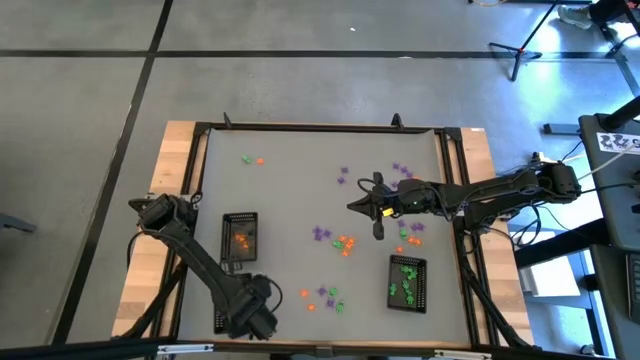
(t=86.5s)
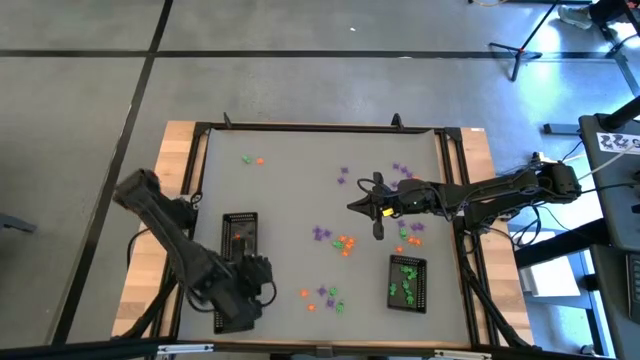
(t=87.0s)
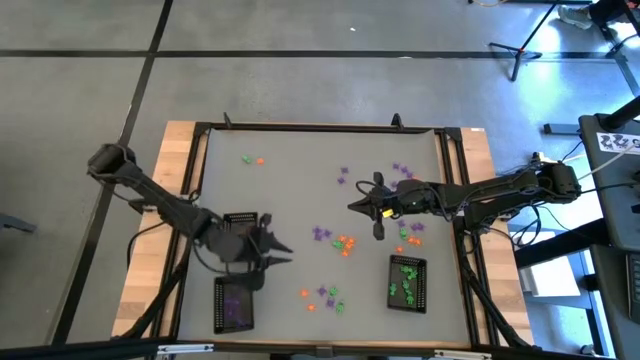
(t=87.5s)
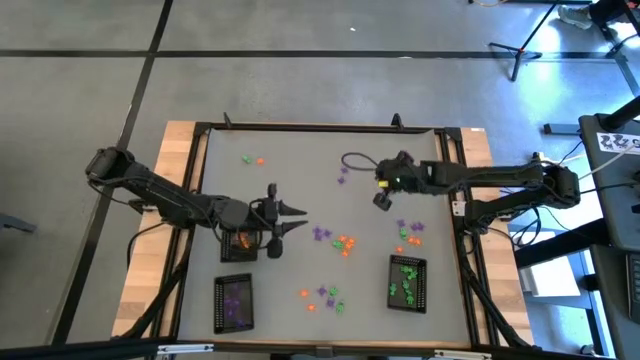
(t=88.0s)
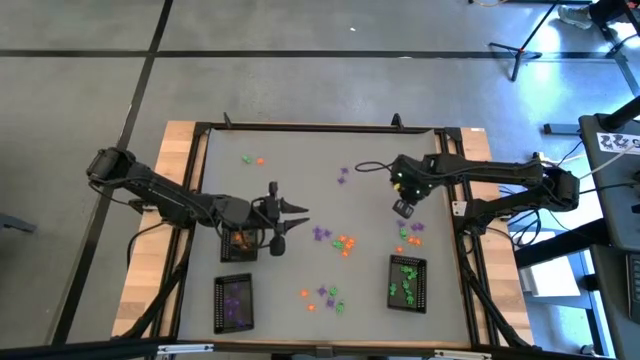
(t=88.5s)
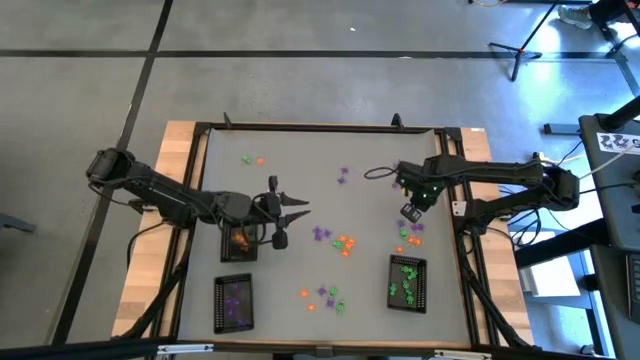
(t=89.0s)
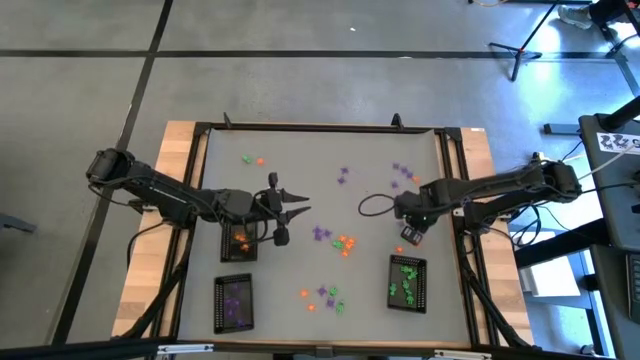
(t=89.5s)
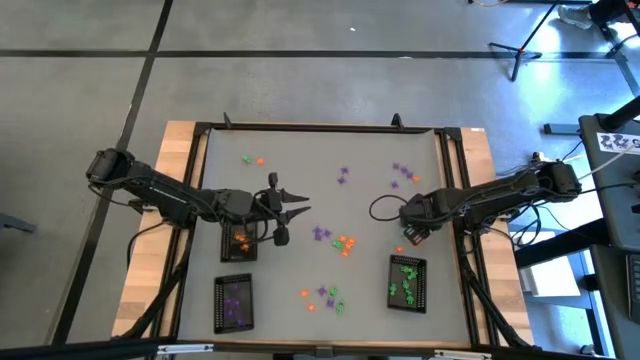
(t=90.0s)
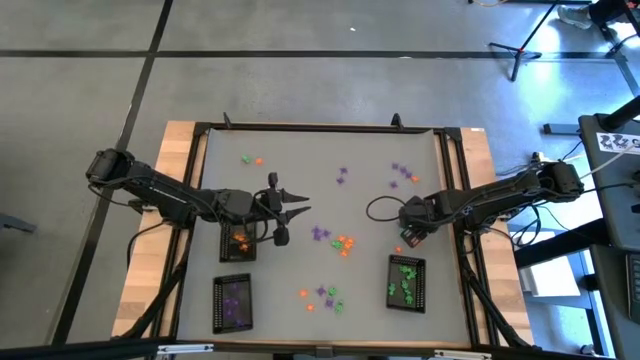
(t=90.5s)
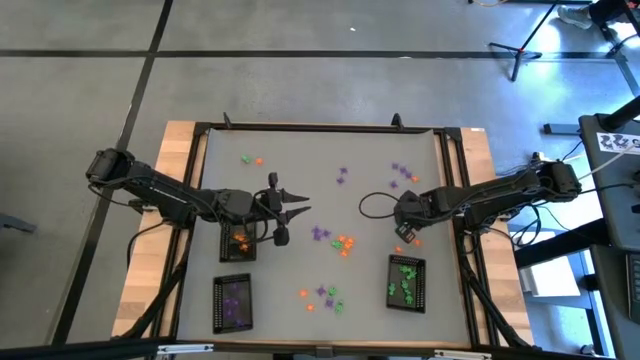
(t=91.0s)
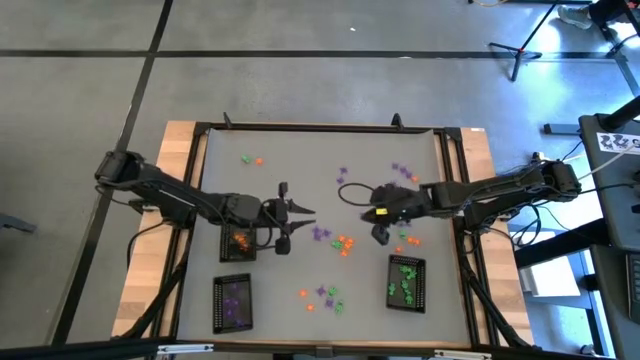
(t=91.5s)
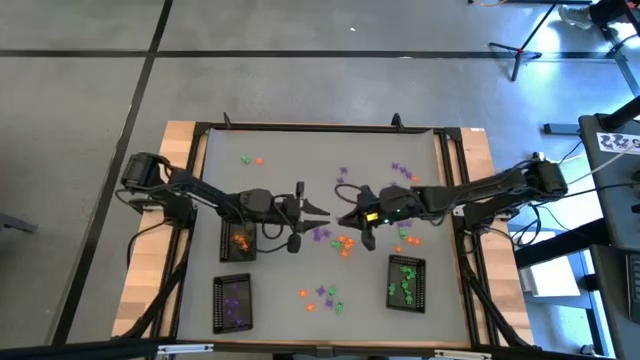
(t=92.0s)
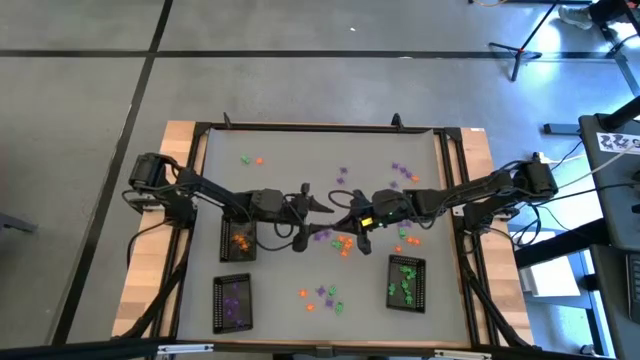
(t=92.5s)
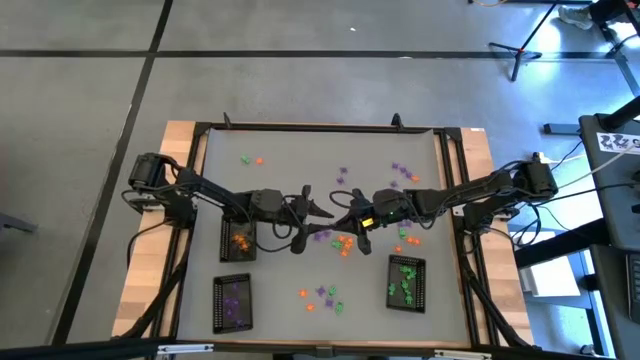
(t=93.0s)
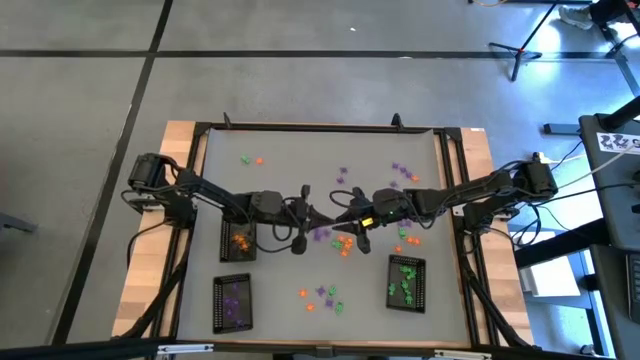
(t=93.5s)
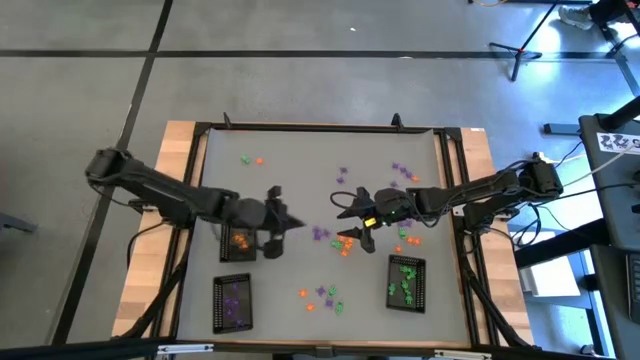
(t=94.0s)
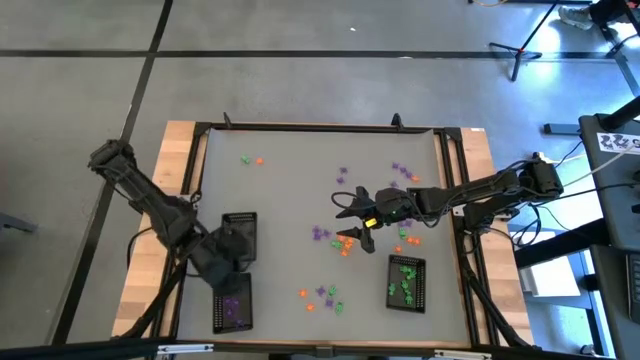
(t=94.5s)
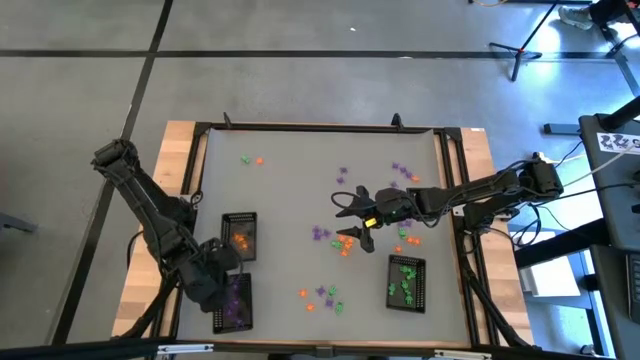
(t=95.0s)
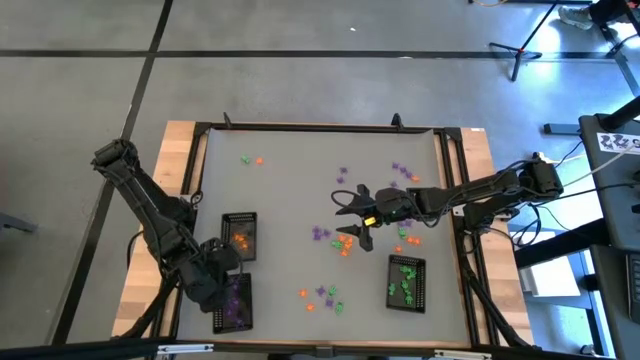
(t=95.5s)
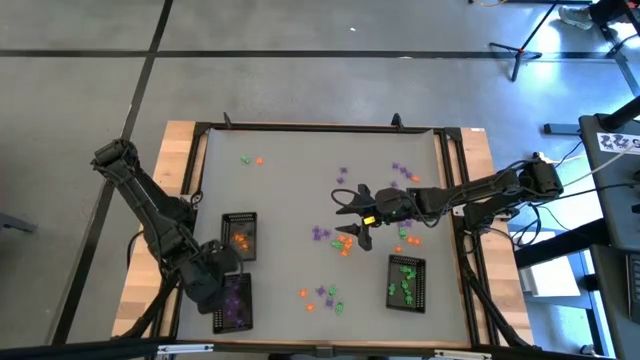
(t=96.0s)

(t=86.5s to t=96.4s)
Task: Sort Halloween decoration
Put the purple spider toy into the bottom left black basket

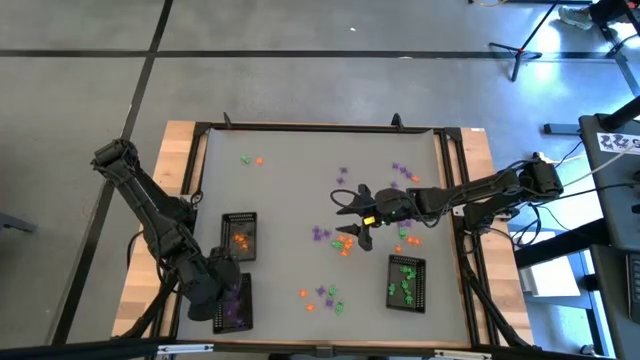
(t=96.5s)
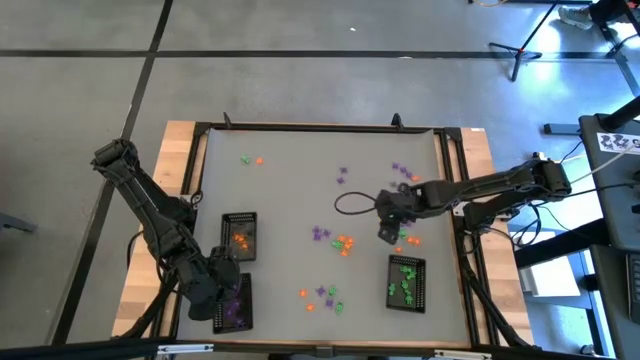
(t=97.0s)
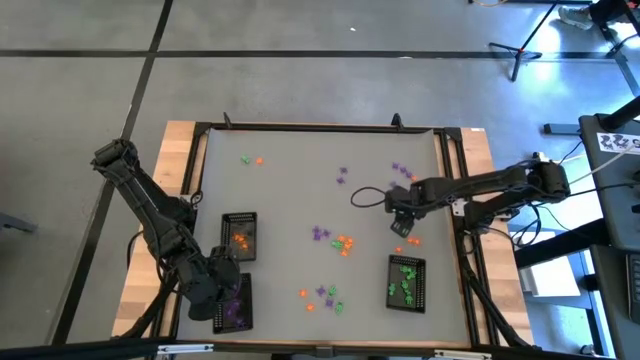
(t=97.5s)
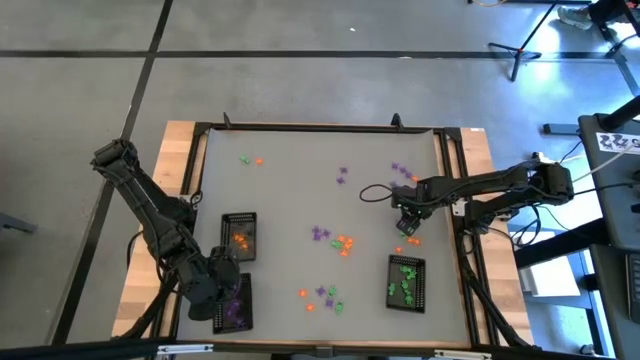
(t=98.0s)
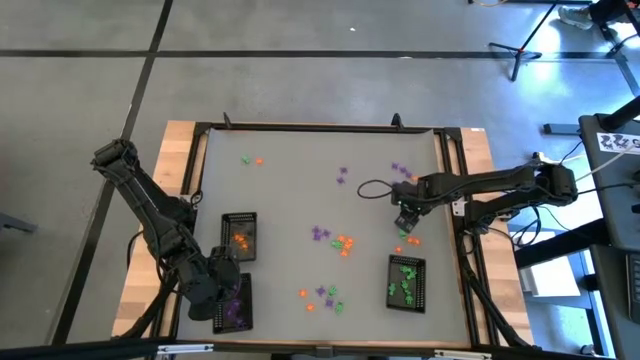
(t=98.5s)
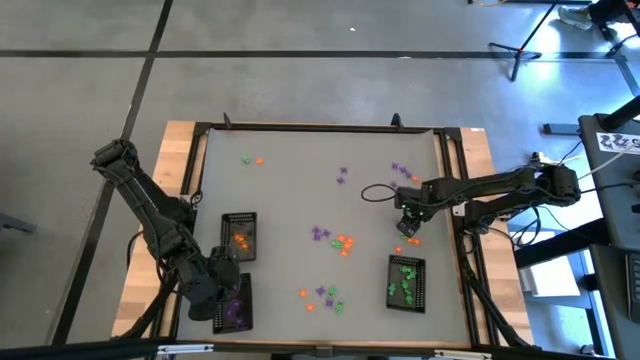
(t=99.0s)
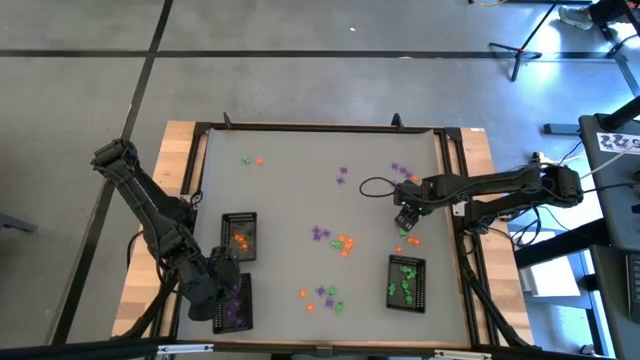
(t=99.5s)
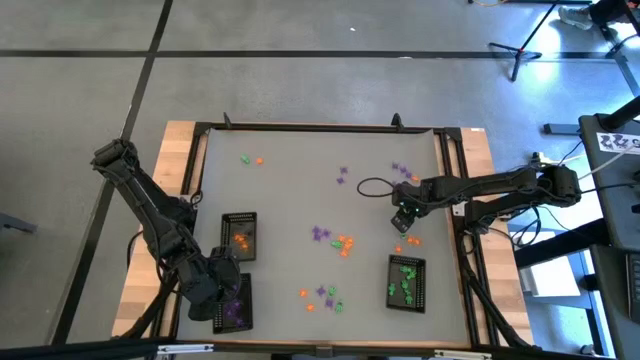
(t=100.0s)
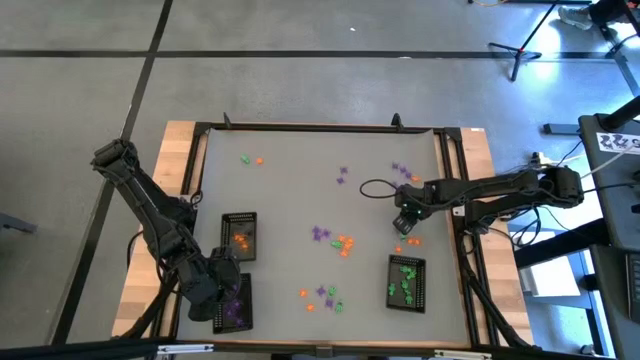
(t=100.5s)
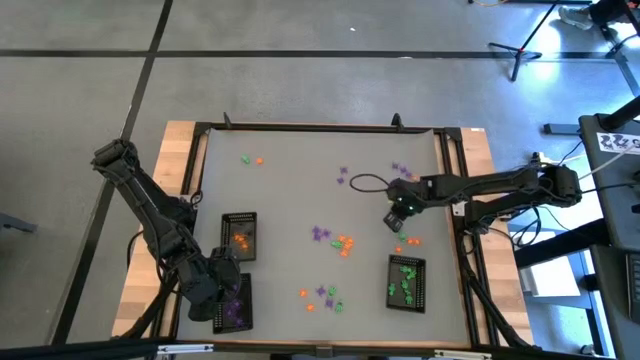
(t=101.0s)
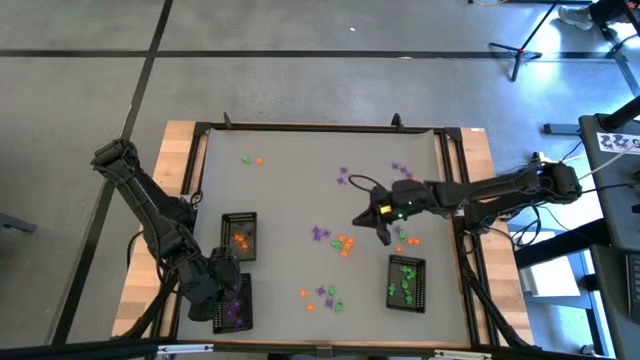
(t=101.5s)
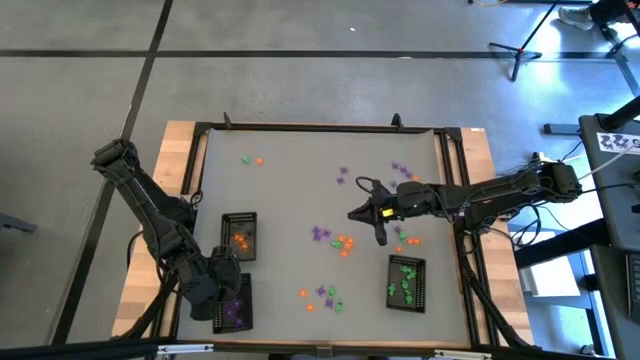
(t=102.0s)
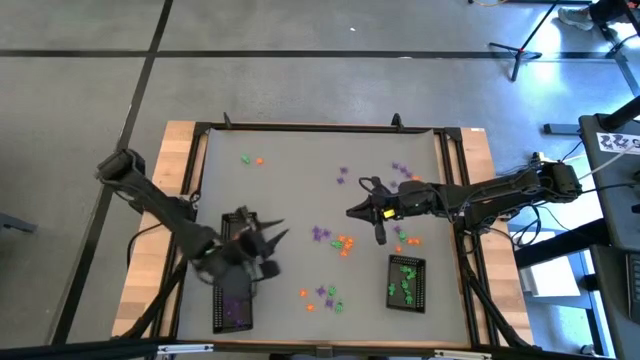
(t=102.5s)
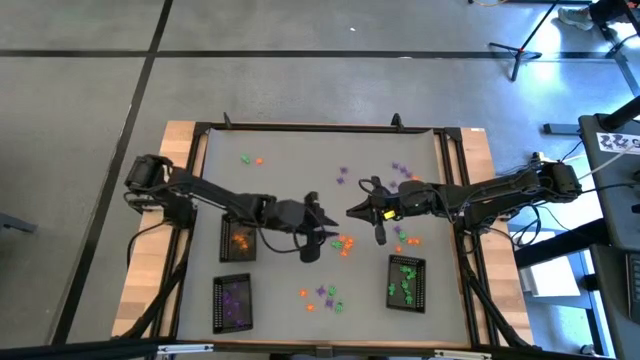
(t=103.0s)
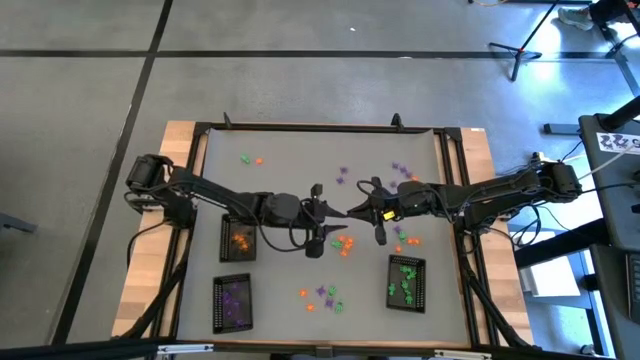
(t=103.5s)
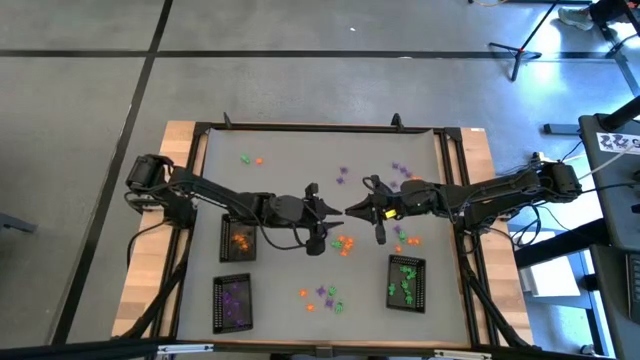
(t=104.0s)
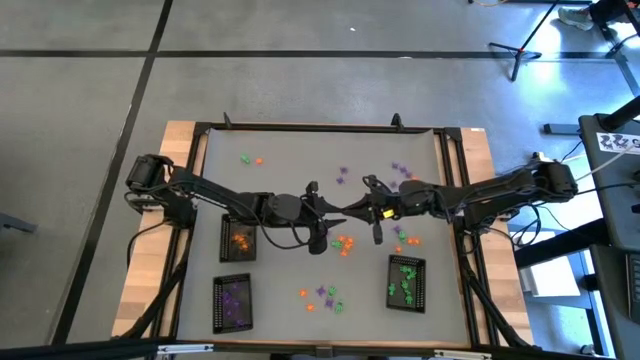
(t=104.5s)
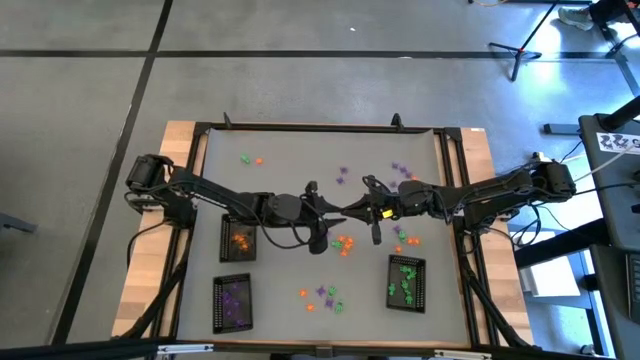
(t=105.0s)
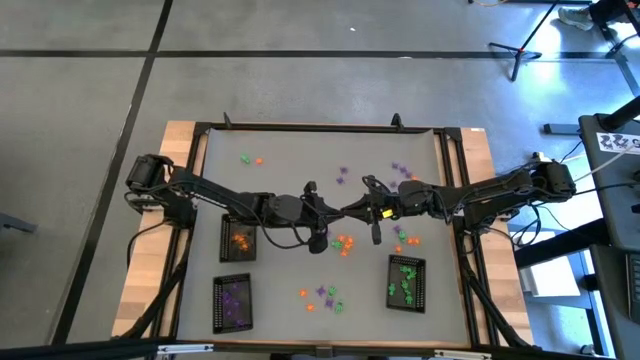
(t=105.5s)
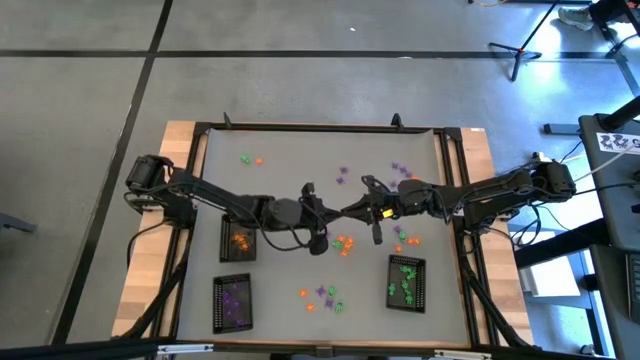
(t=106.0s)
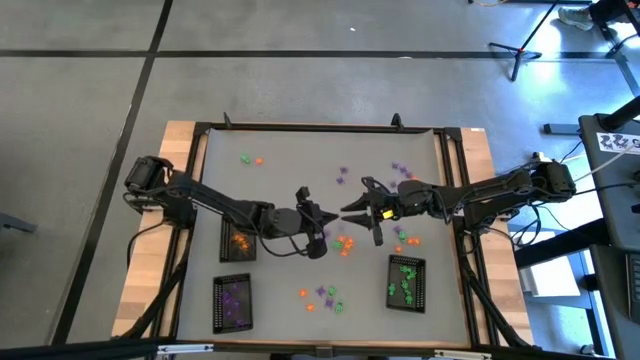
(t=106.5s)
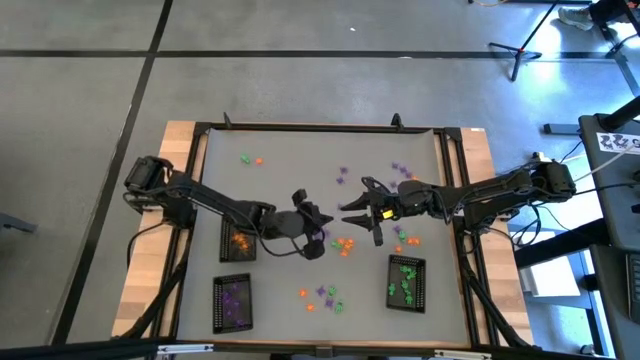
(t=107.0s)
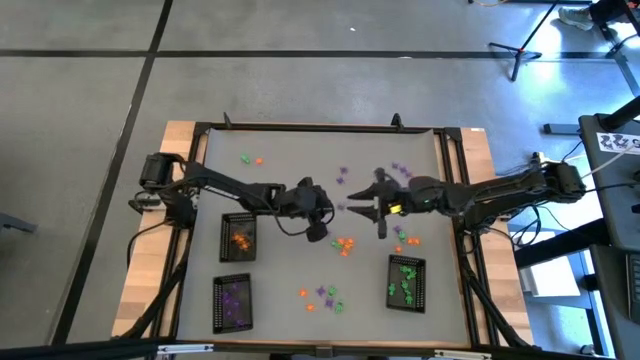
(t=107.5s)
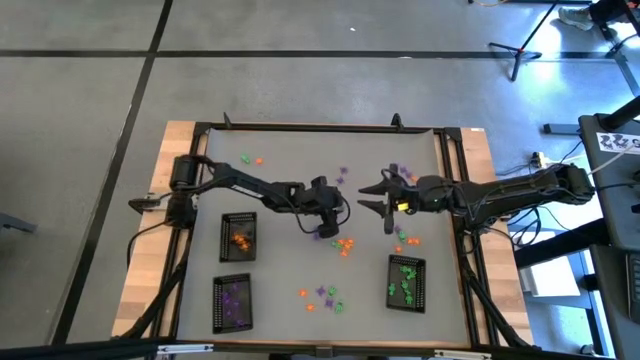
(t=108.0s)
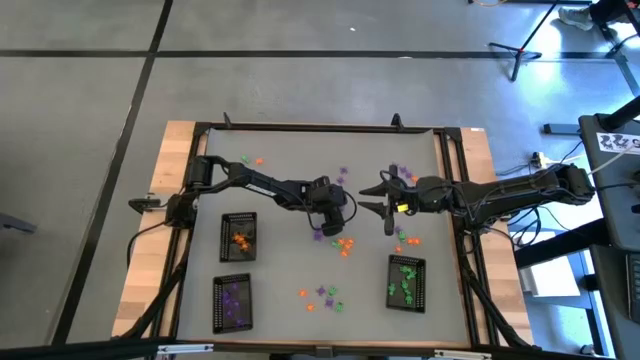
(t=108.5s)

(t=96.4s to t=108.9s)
Put the purple spider toy into the bottom left black basket
